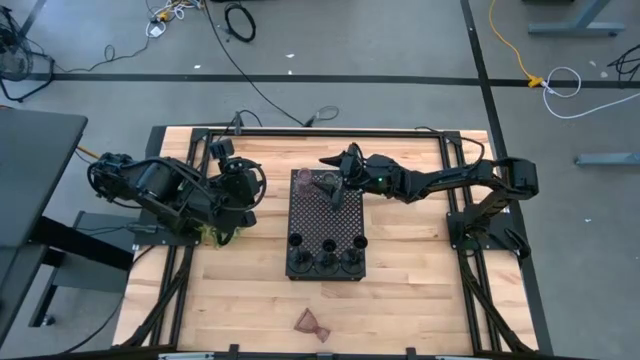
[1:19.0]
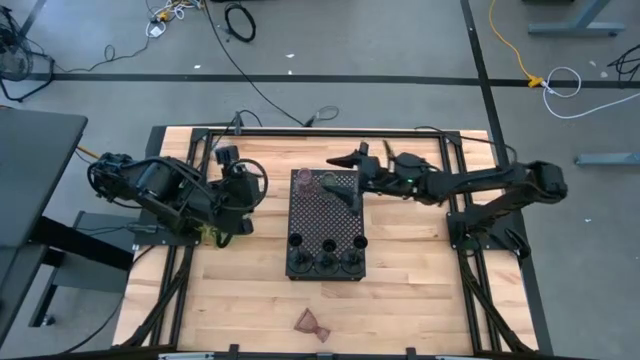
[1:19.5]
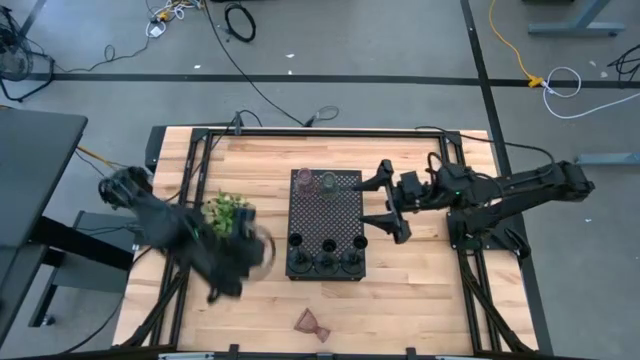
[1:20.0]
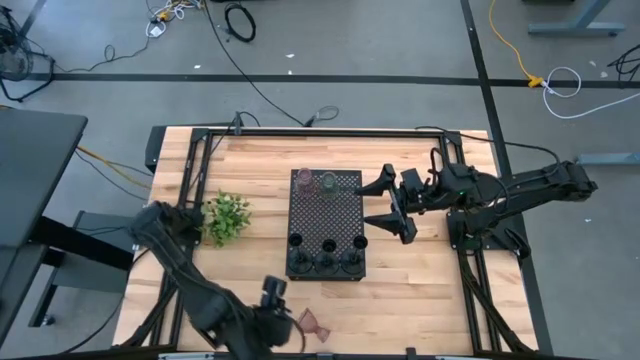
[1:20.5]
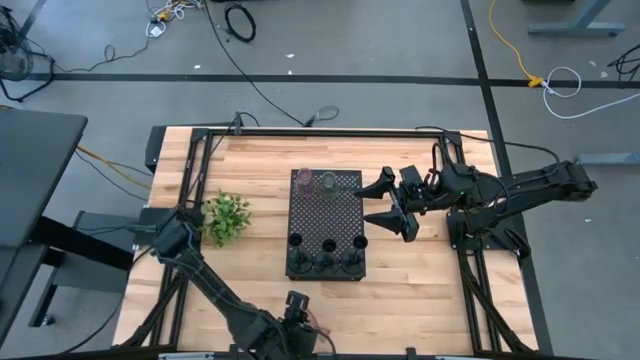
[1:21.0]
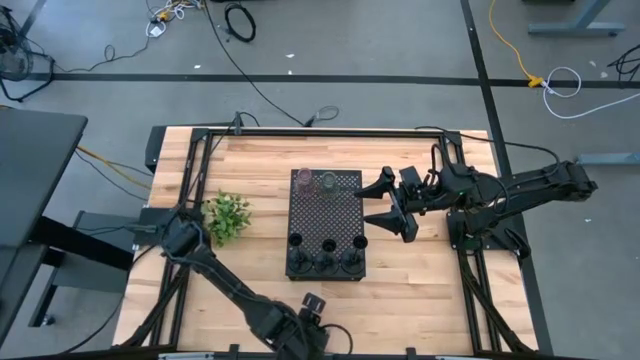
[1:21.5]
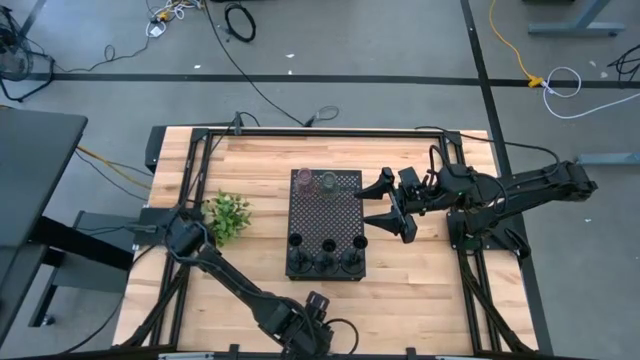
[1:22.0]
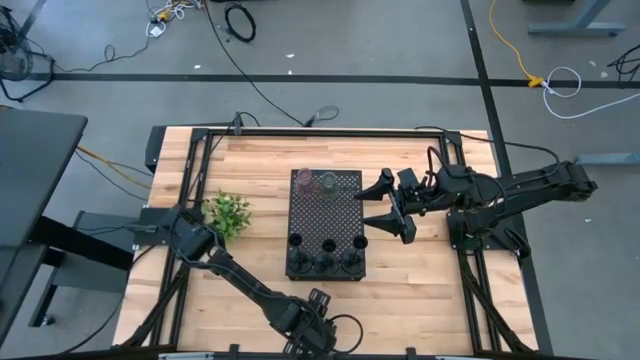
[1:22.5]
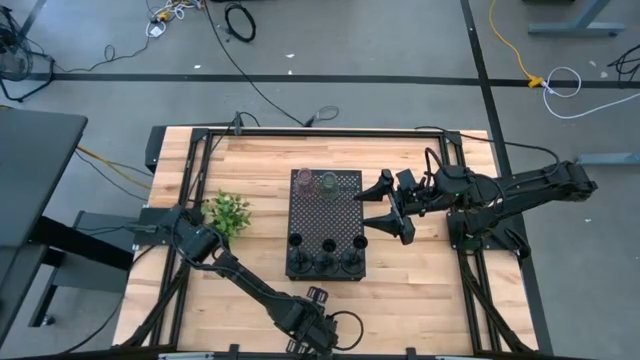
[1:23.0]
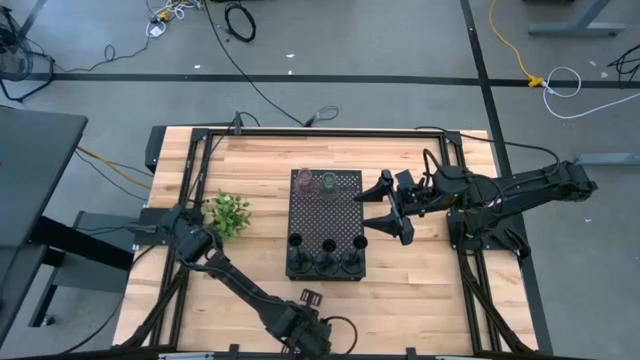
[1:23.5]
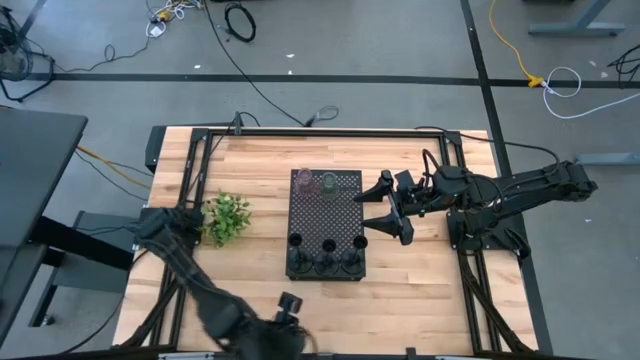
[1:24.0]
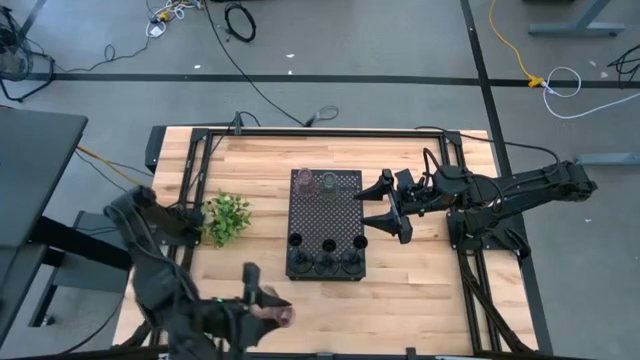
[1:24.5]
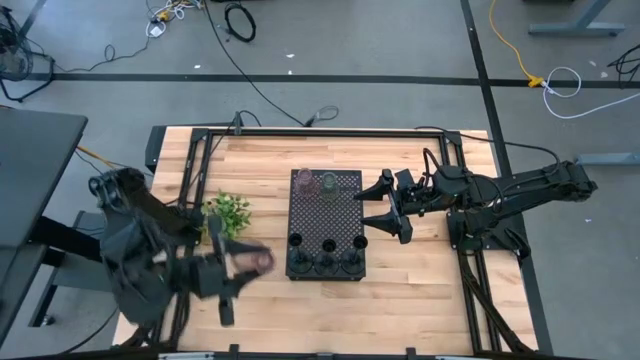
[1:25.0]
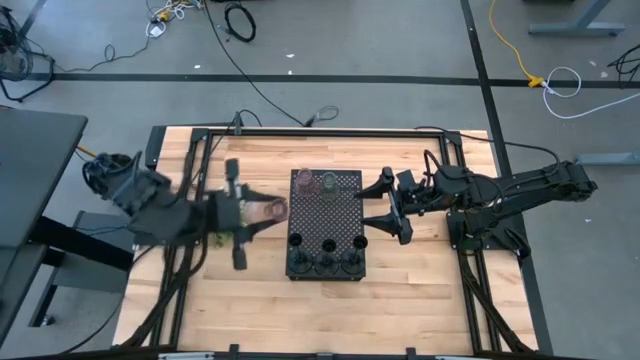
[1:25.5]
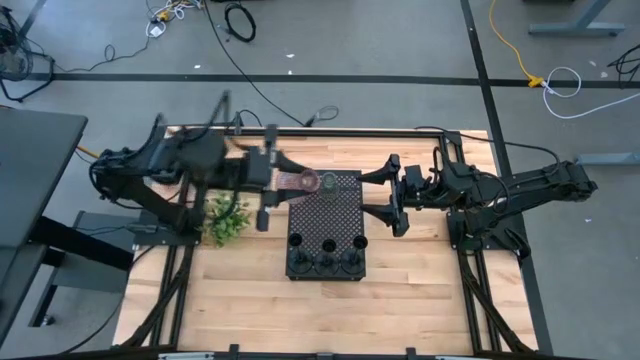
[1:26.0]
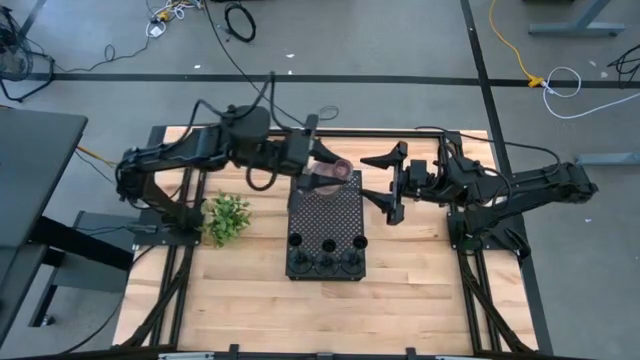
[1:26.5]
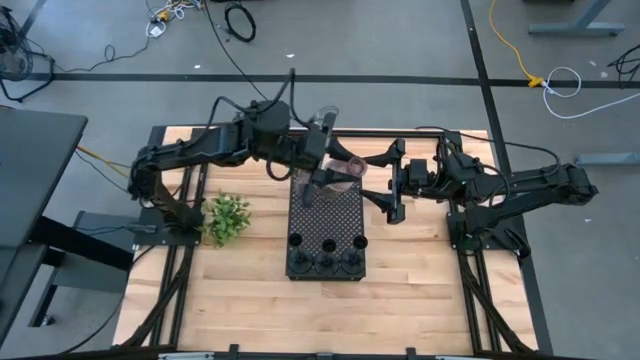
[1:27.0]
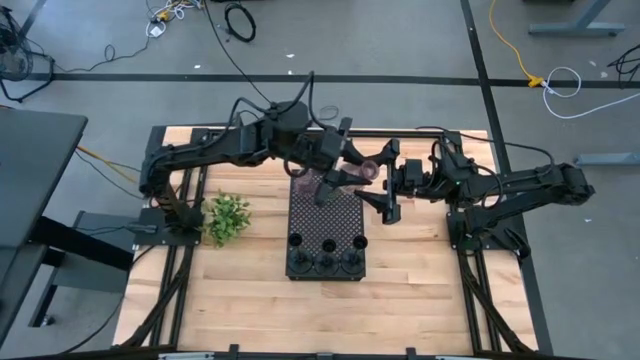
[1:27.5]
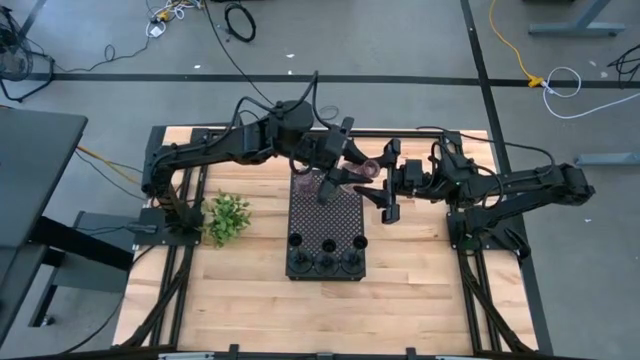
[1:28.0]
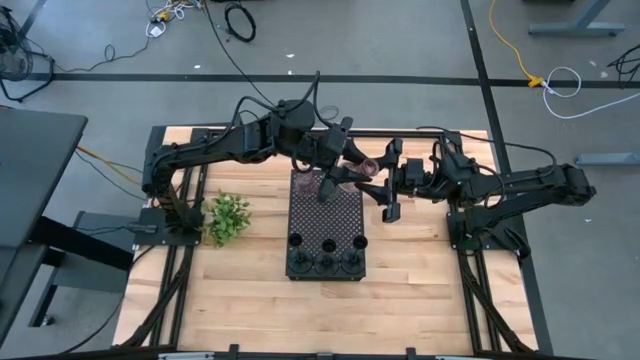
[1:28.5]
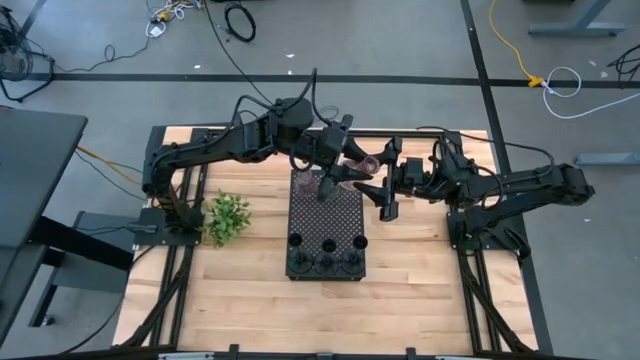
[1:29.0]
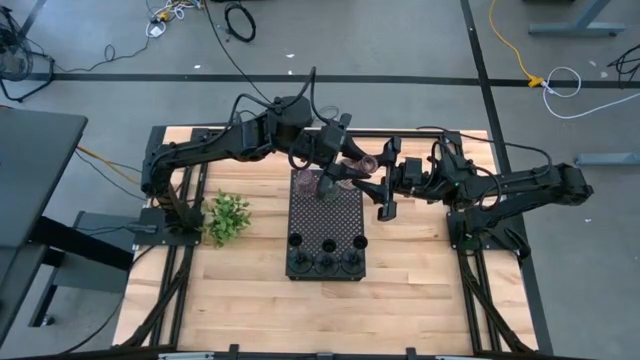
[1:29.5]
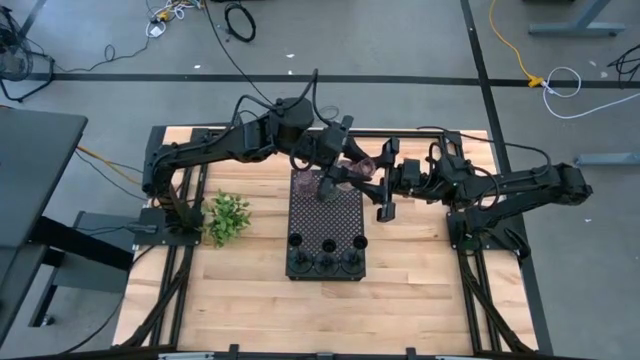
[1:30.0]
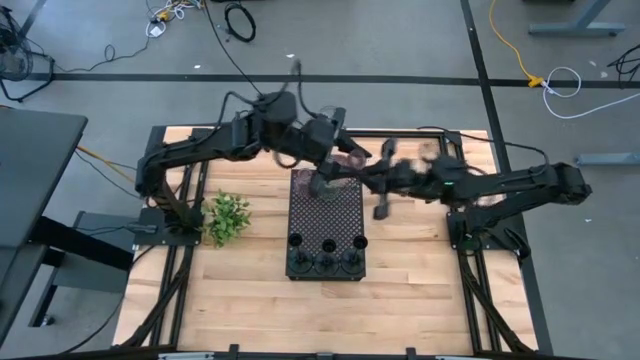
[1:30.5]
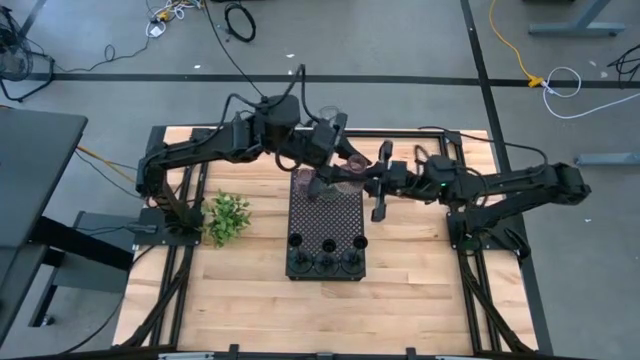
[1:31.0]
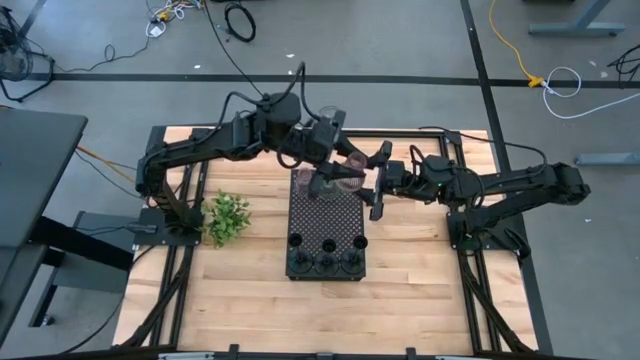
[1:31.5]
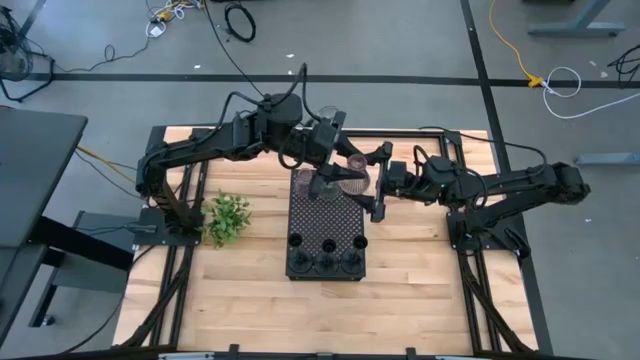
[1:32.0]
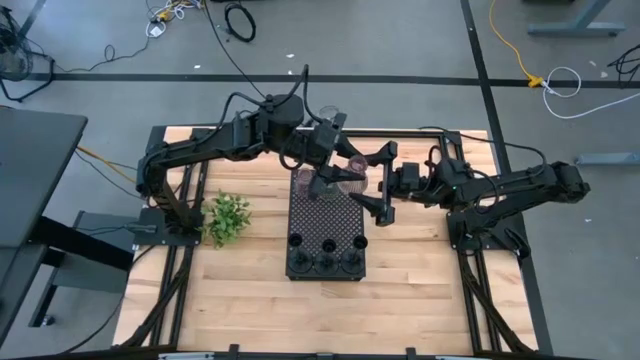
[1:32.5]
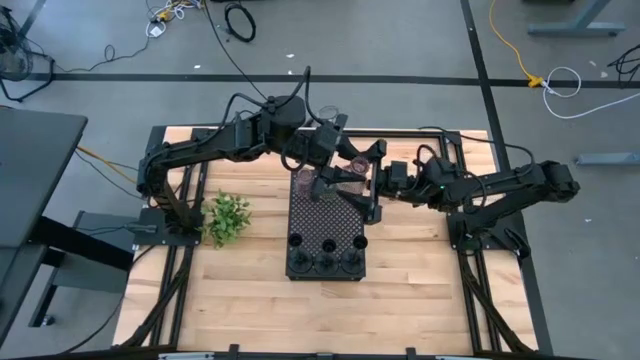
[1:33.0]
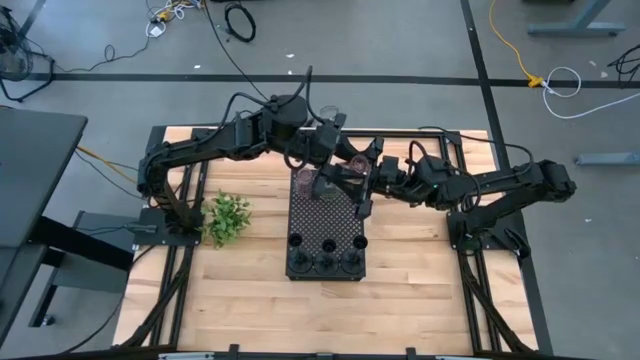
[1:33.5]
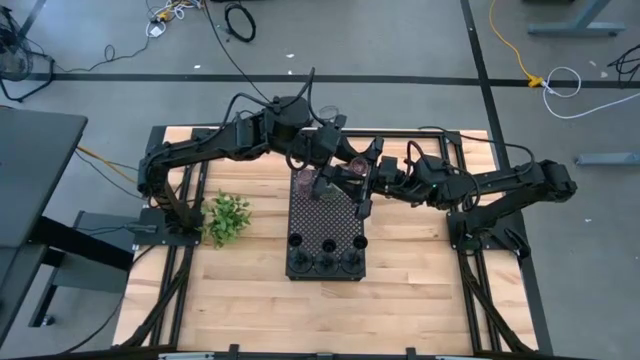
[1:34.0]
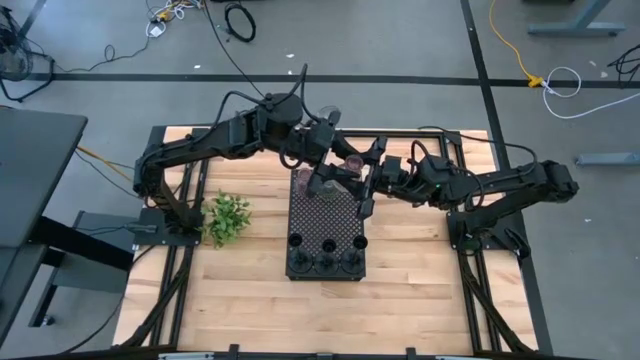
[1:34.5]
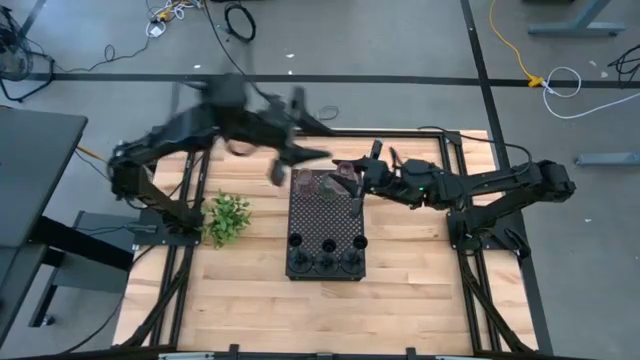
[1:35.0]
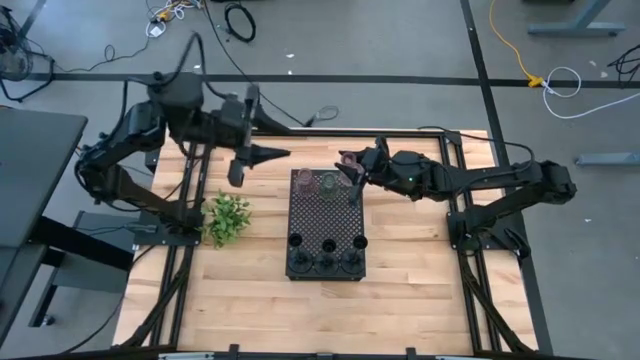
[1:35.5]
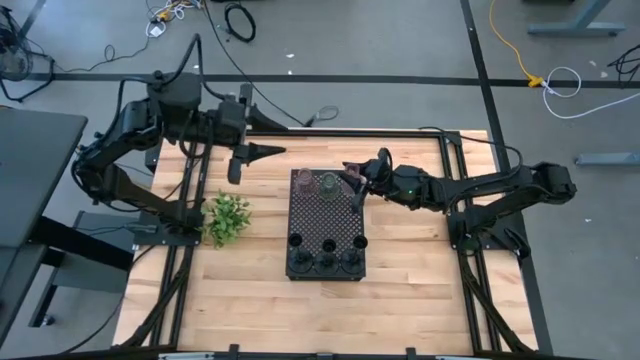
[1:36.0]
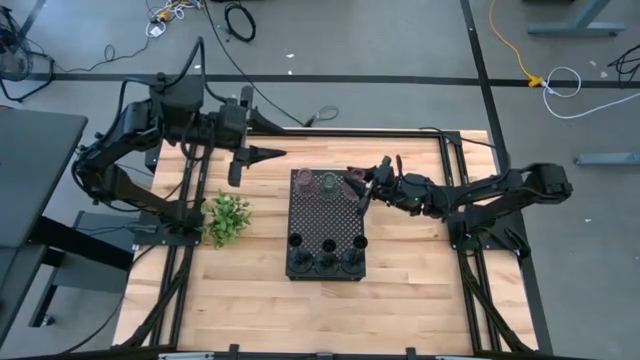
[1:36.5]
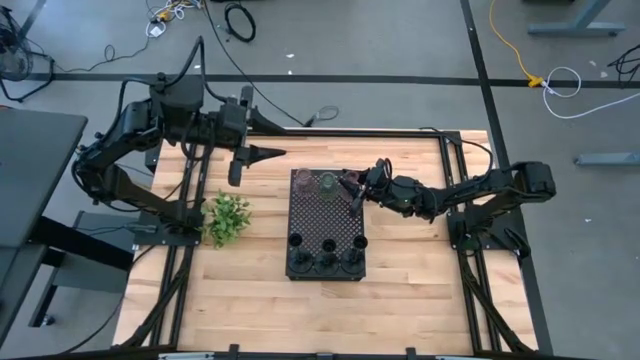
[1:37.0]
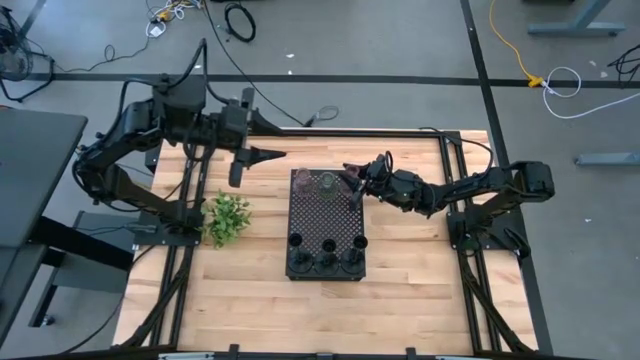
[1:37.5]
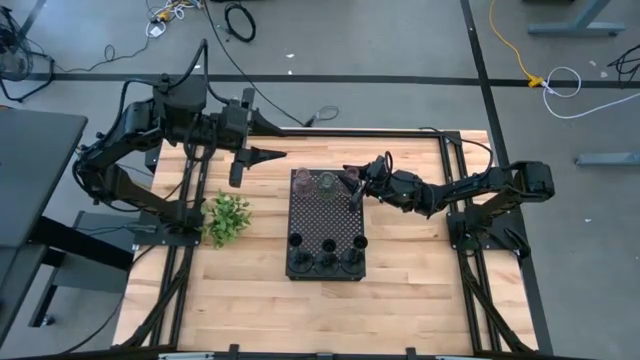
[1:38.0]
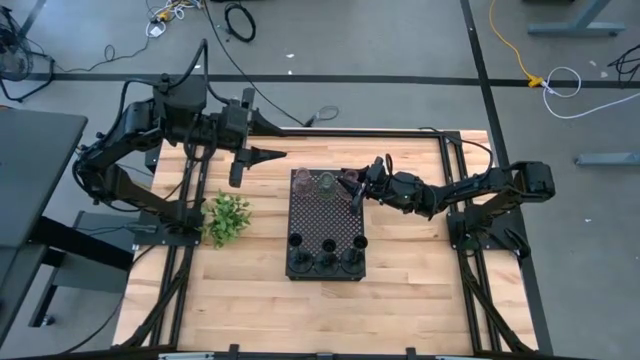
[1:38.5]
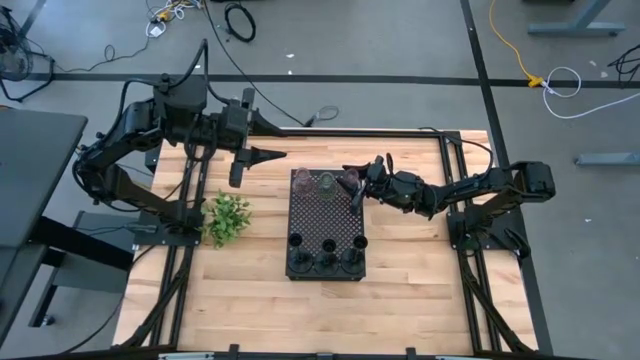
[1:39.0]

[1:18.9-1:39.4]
Task: Pick & Place candle stick holders
Put the pink glass candle holder on the shelf

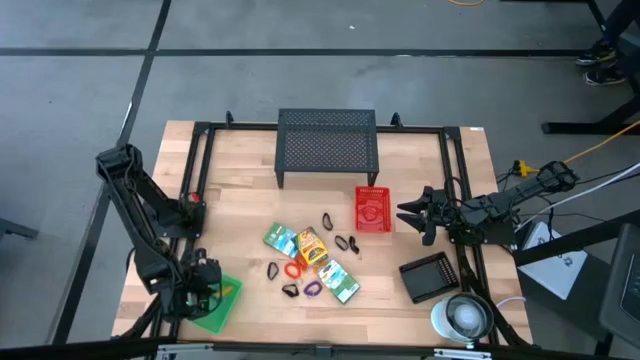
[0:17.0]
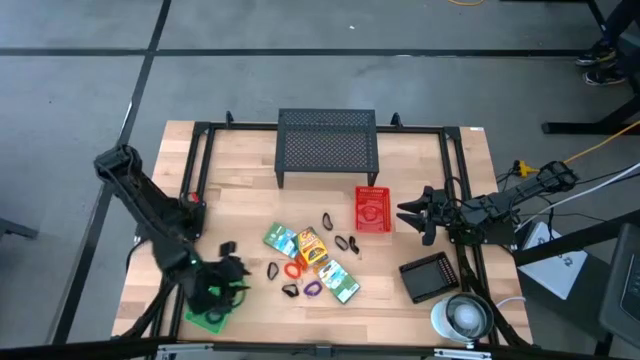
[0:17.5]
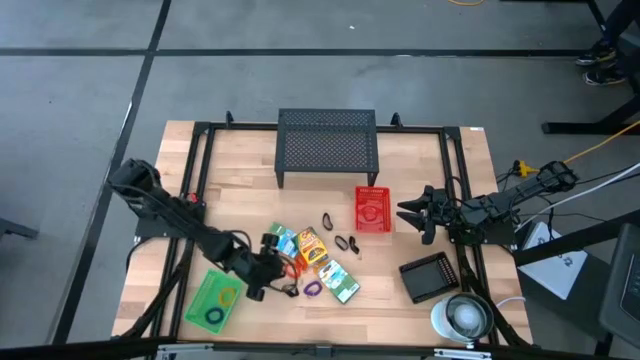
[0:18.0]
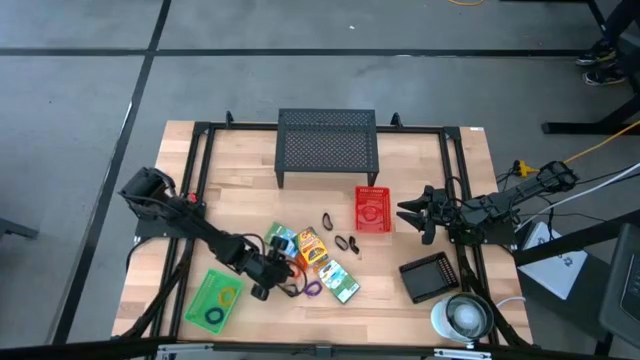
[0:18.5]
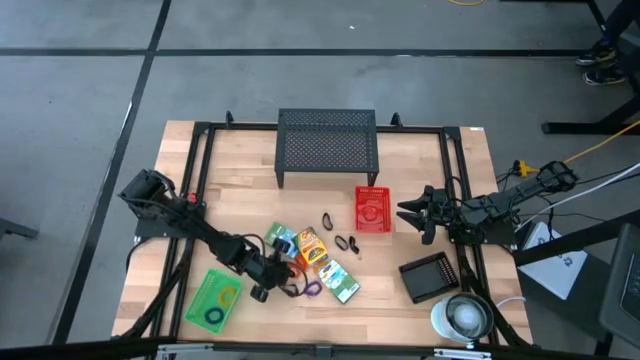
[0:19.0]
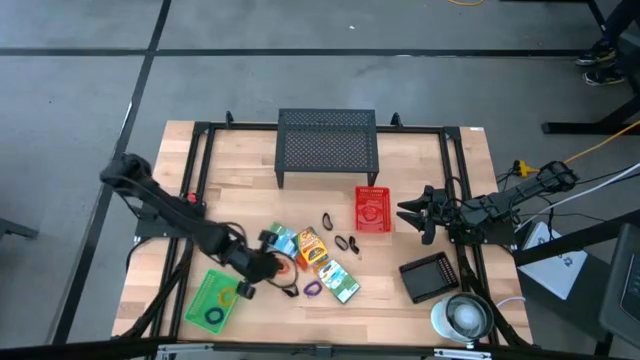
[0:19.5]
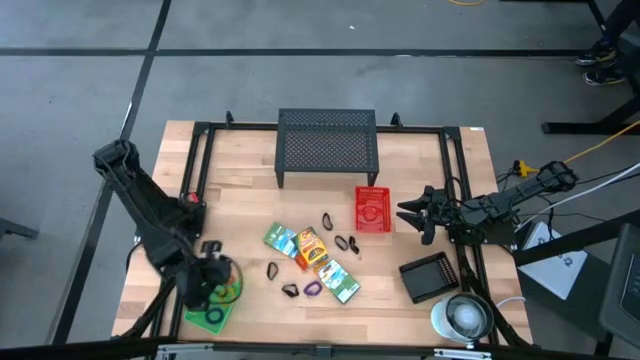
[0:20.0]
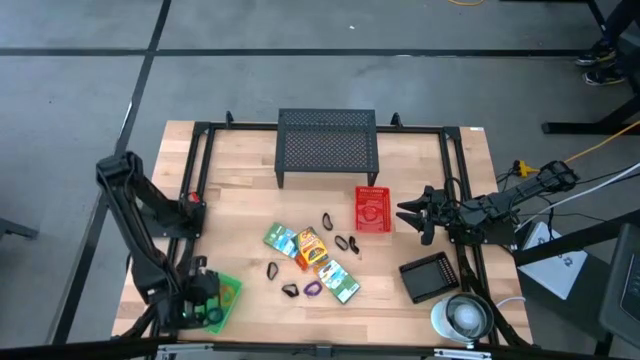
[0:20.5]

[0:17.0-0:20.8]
Task: Pick & Place Office Desk Supplies
Put the orange spring keychain into the green bin
